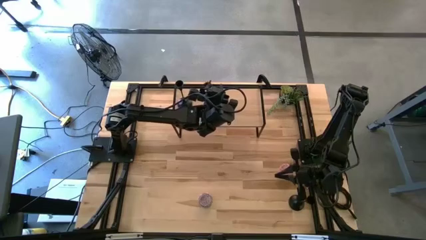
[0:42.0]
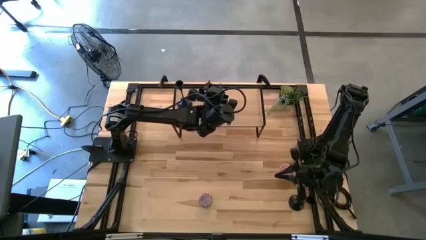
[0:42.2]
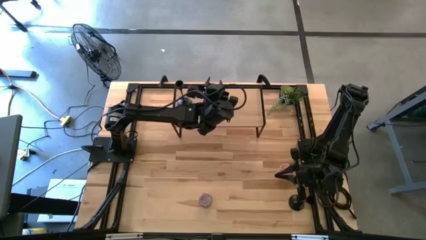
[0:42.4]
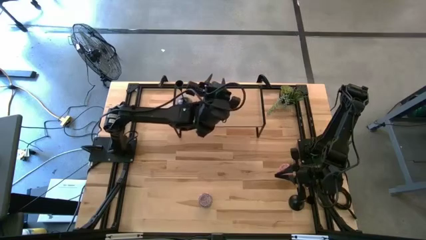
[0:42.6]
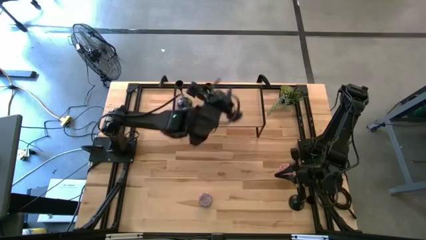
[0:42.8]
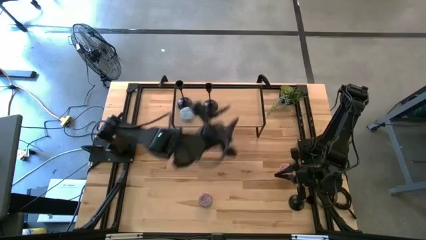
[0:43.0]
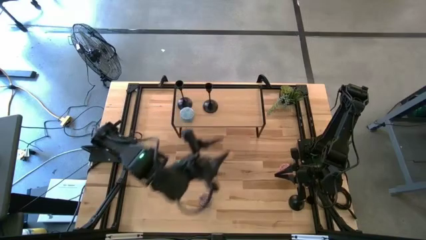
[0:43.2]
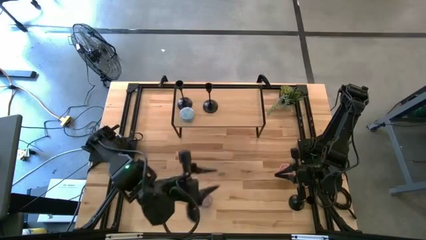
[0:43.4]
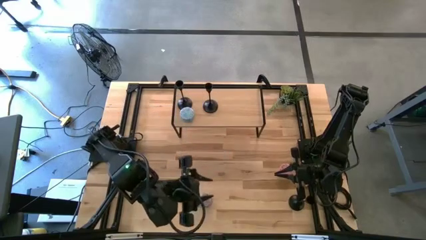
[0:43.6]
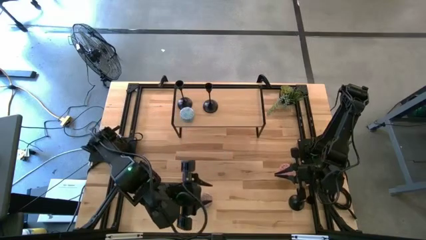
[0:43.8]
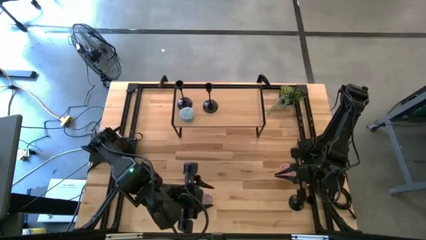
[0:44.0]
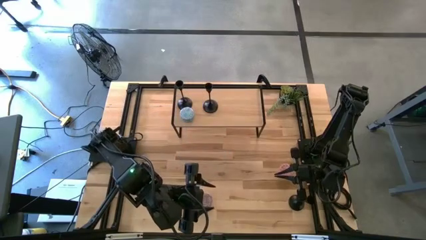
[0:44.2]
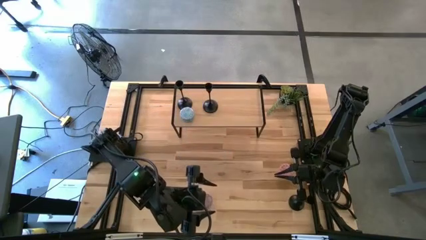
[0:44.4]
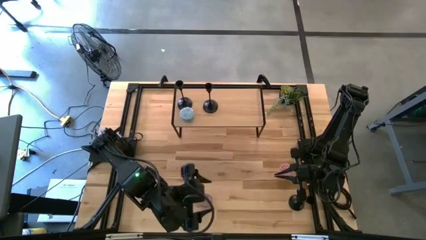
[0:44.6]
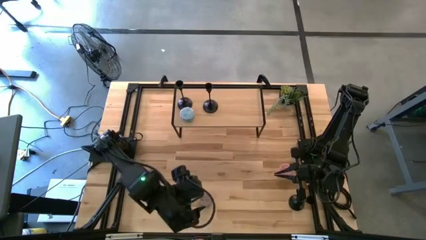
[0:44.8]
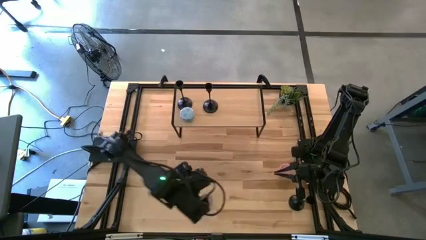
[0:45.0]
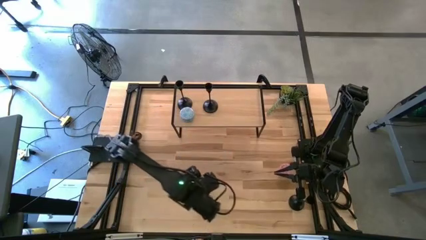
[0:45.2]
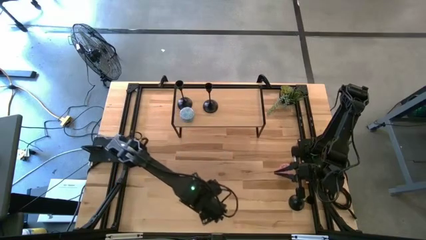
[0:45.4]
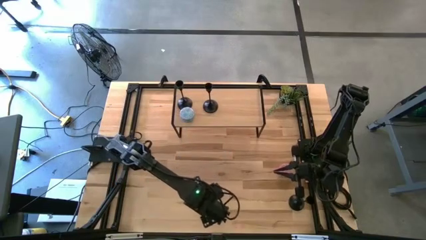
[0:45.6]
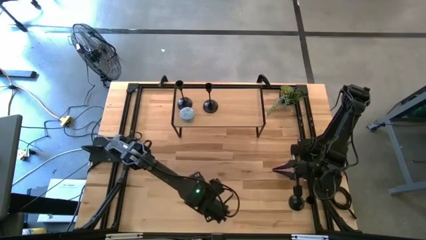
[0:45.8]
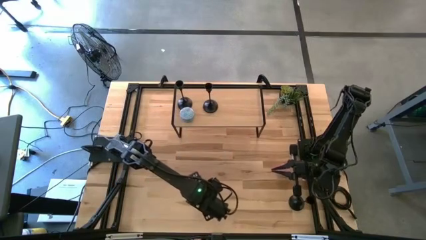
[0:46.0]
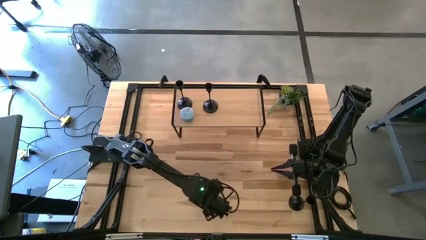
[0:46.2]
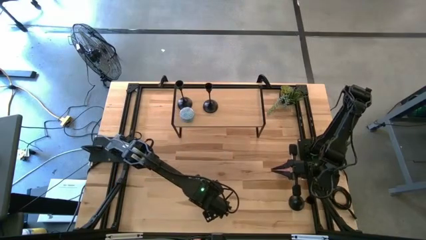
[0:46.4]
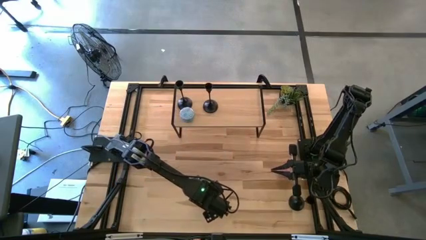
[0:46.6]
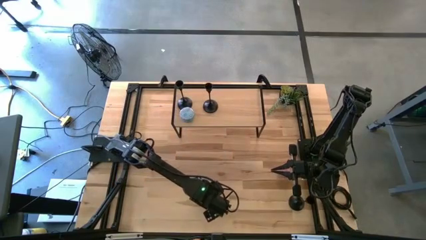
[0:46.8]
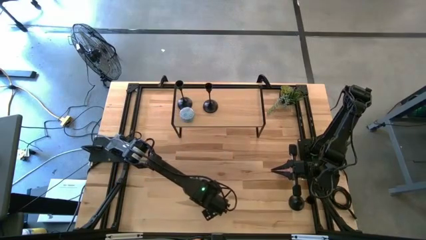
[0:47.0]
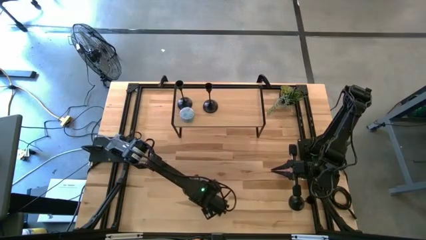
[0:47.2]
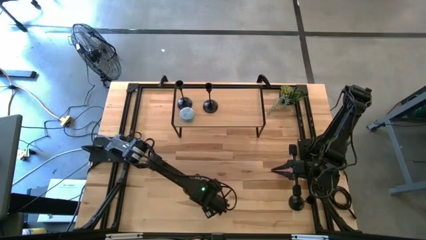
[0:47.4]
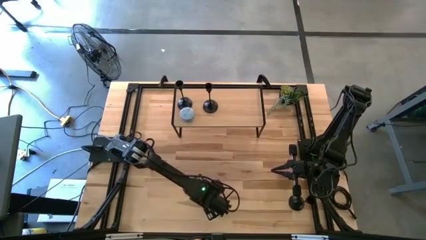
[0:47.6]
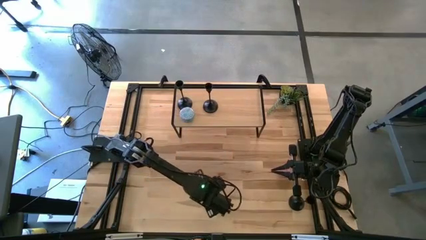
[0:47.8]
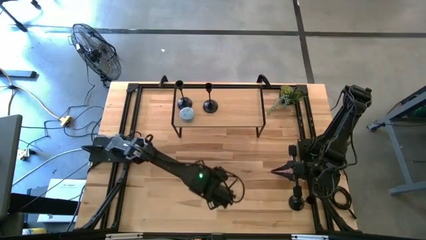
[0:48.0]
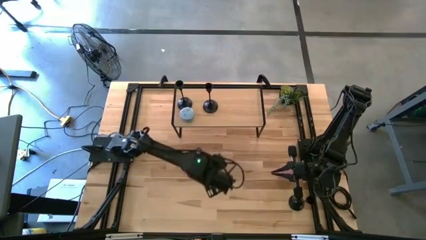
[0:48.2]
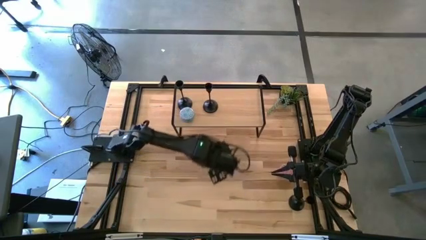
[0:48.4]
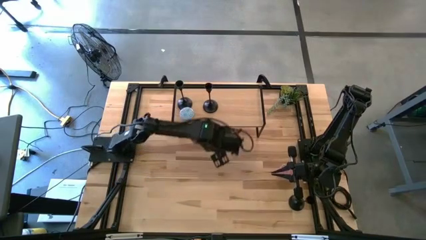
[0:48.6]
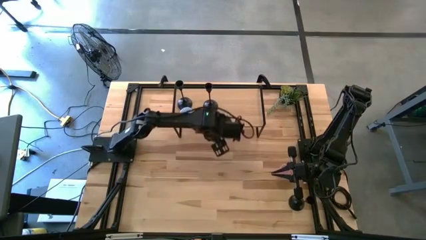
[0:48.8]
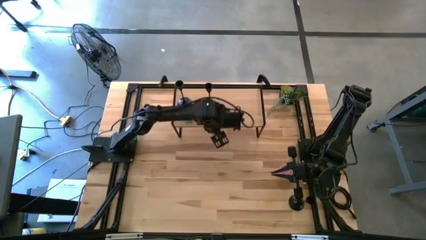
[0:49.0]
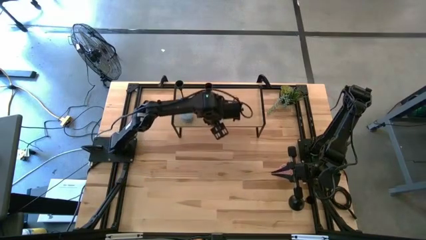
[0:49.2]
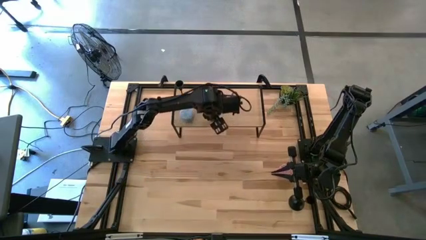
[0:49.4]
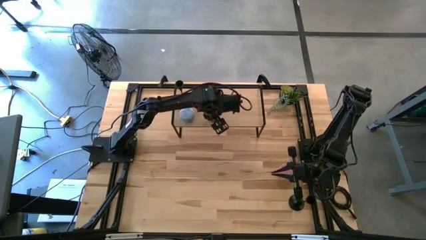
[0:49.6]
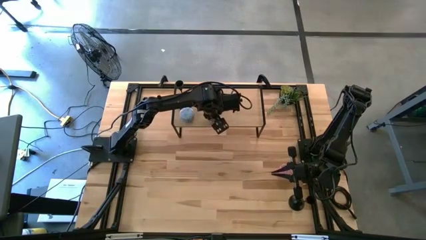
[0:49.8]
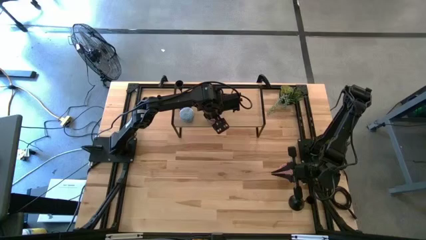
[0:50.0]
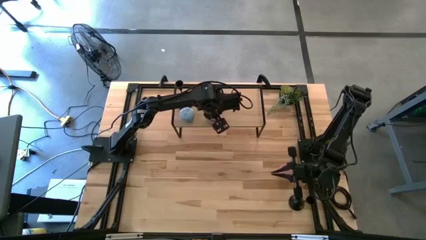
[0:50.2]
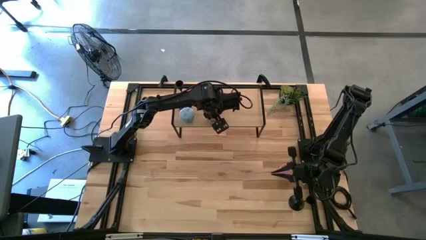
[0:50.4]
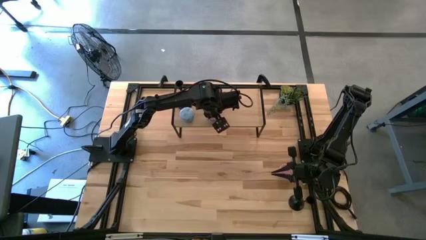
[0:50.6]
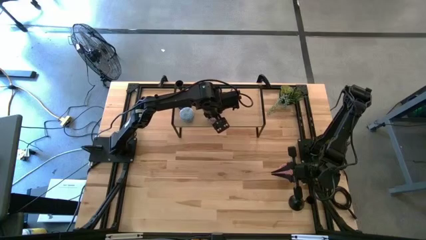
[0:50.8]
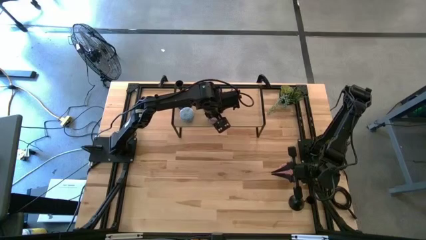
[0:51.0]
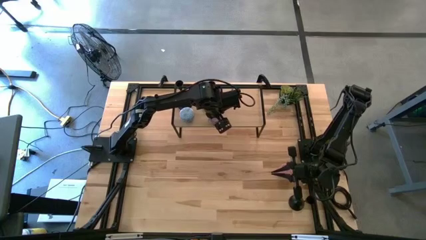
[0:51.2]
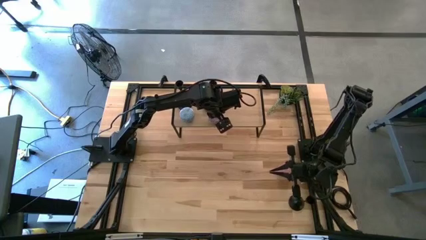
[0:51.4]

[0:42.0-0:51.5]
Task: Pick & Place candle stick holders
Put the red scented candle on the shelf

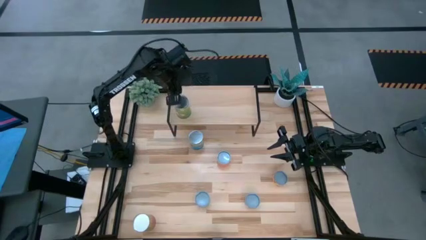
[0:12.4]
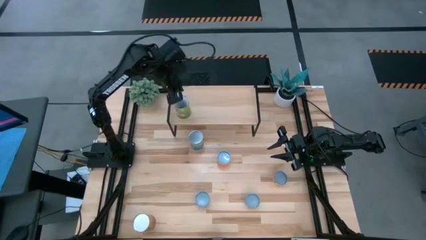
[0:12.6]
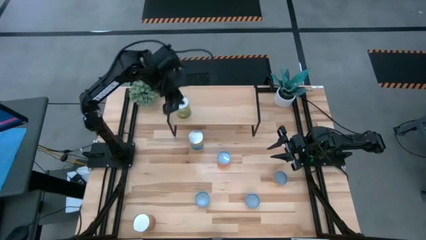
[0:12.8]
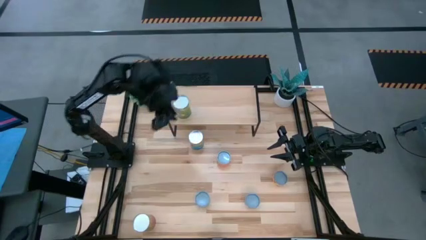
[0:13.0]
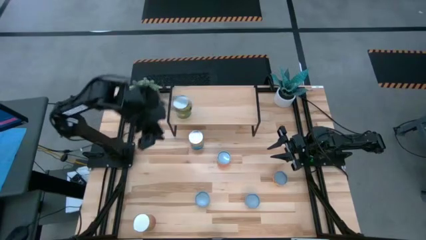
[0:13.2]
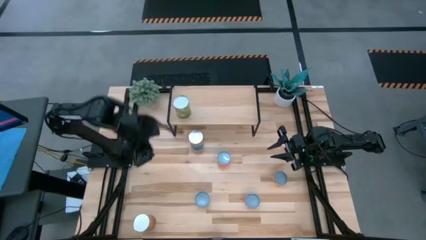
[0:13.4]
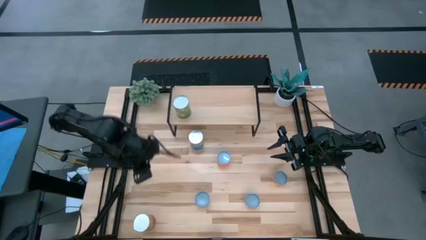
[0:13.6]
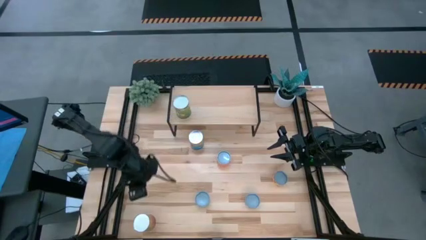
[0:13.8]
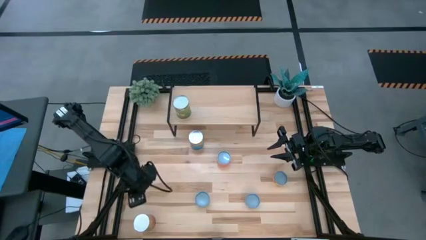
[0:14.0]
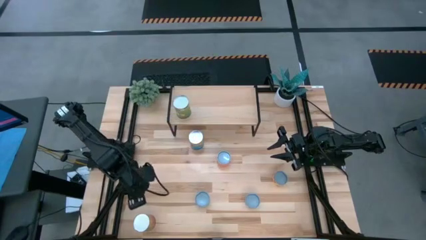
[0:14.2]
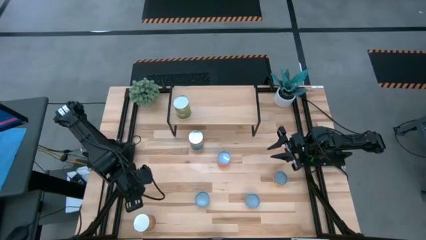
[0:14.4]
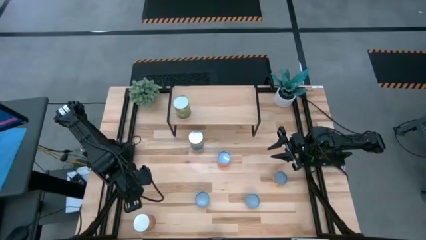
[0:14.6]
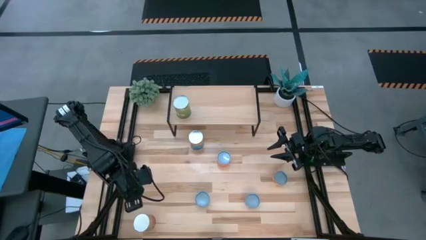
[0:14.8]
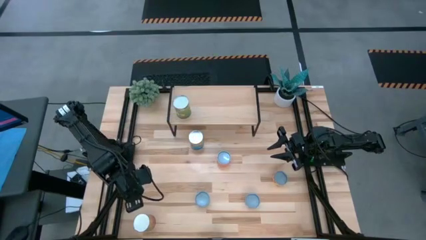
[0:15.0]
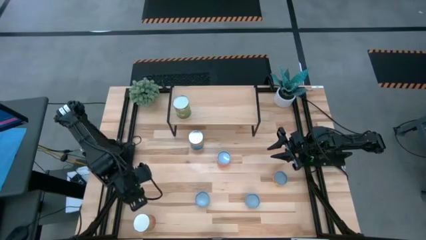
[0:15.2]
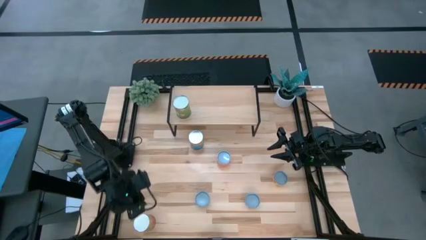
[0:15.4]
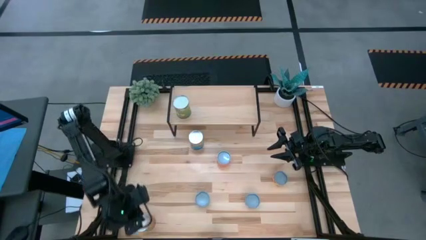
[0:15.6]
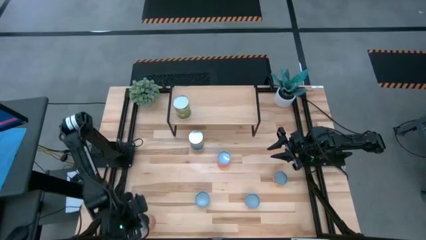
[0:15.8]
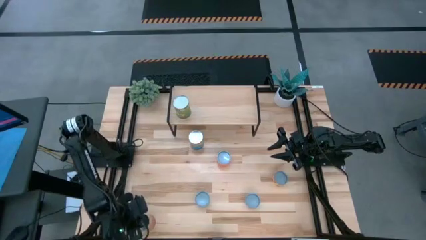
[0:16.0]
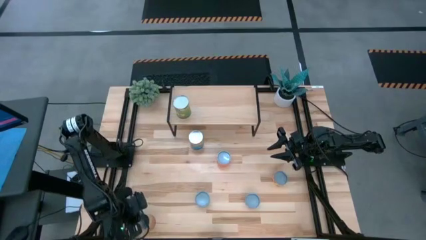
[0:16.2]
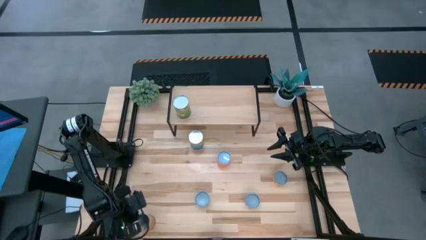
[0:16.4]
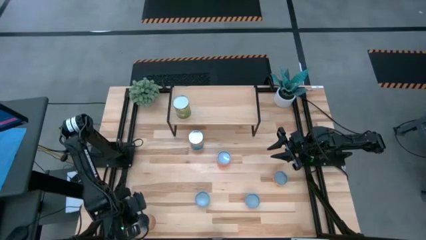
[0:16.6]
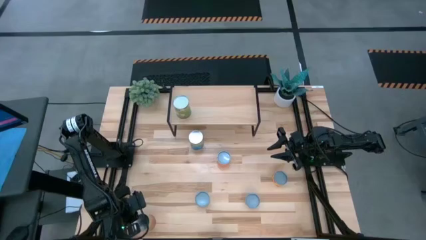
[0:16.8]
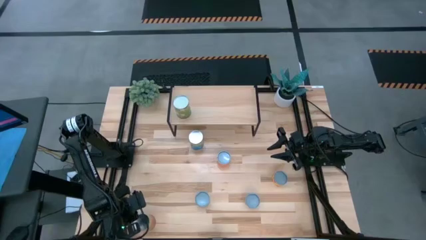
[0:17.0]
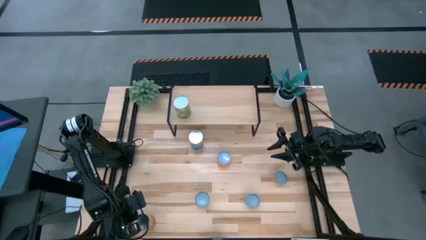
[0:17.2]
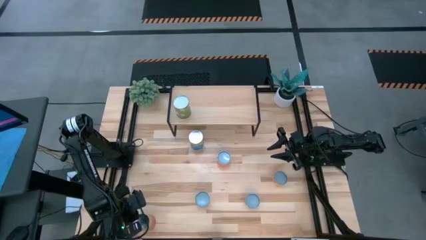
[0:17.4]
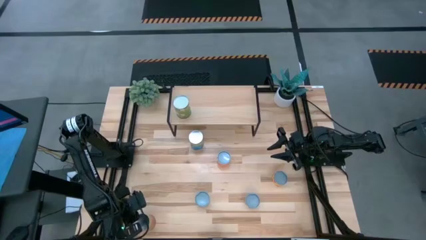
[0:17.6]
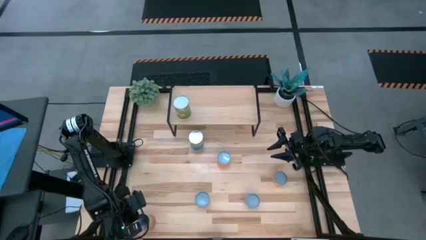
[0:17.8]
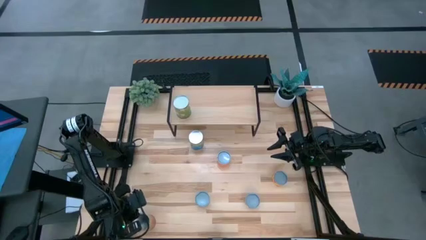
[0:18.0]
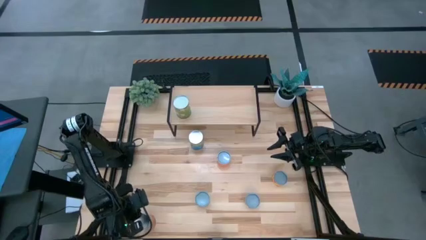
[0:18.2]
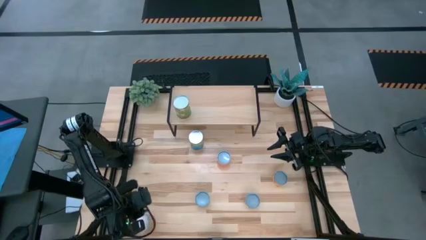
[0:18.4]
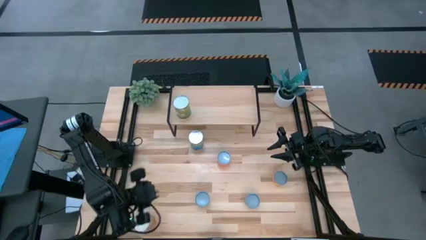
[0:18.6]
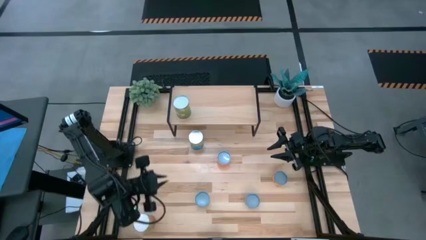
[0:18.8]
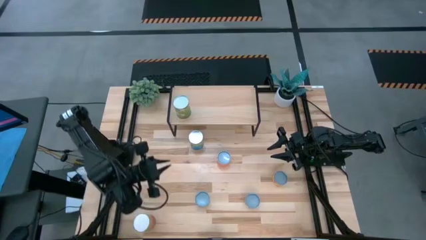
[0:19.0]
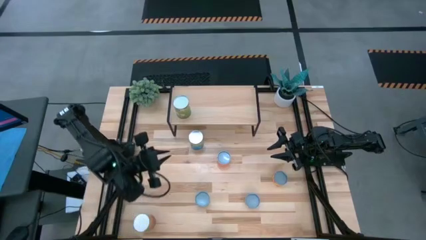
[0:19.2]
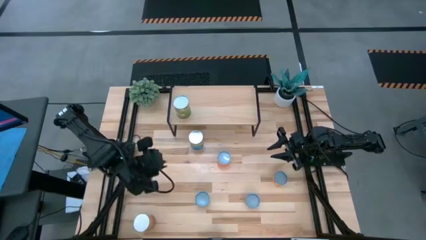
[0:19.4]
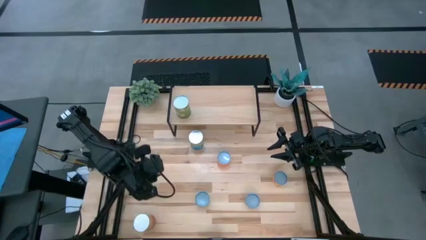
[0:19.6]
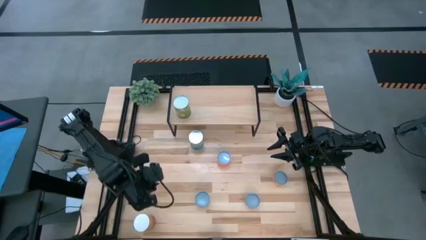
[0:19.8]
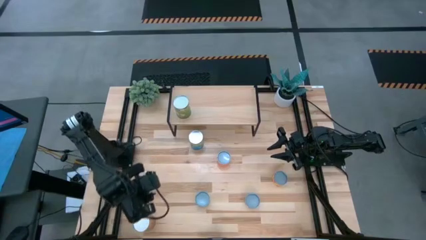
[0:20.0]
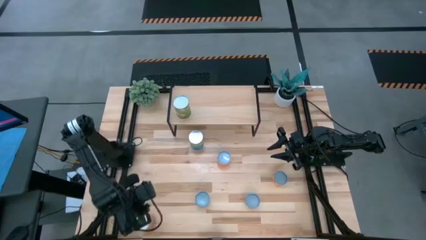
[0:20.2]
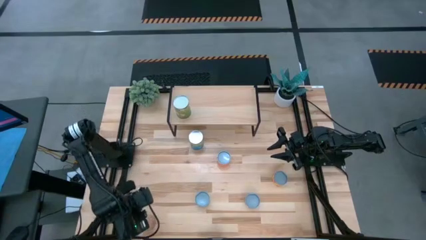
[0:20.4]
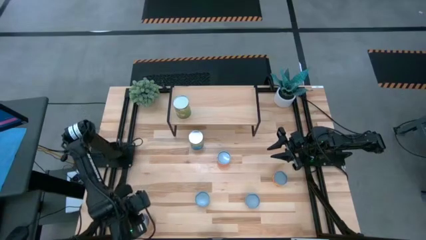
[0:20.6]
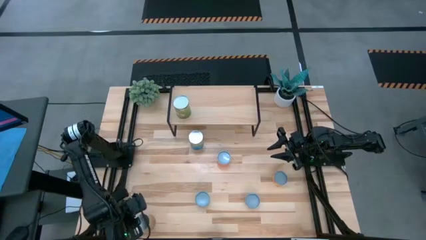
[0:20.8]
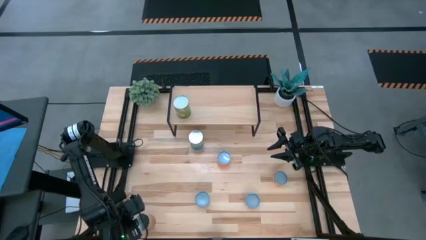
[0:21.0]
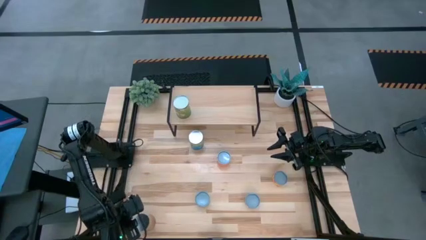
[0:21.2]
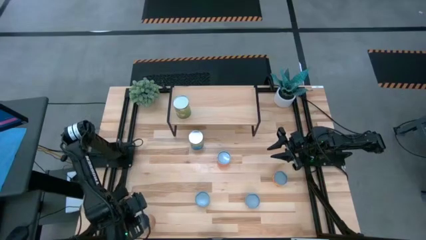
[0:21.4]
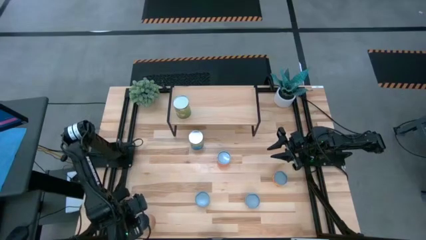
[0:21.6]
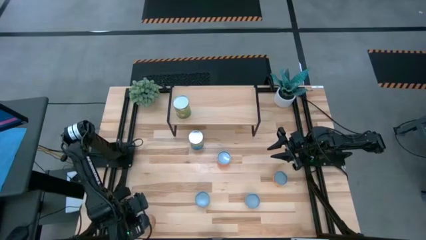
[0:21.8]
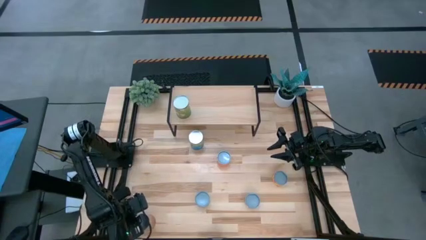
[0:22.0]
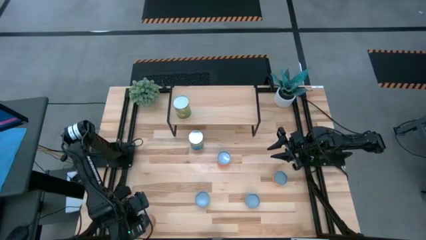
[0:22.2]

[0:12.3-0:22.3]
Task: Pick and place cans onto a shelf
Put the canned green beans on the shelf
